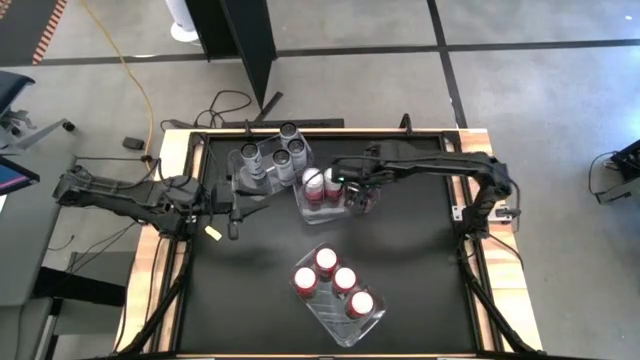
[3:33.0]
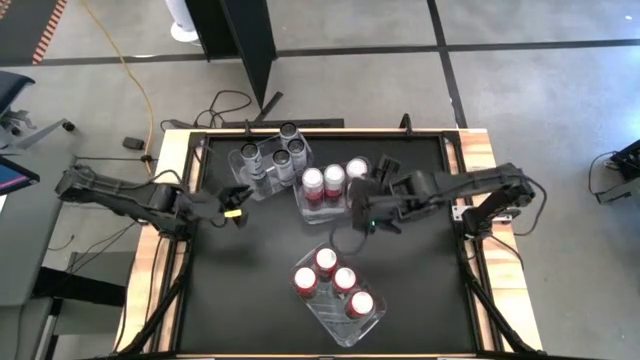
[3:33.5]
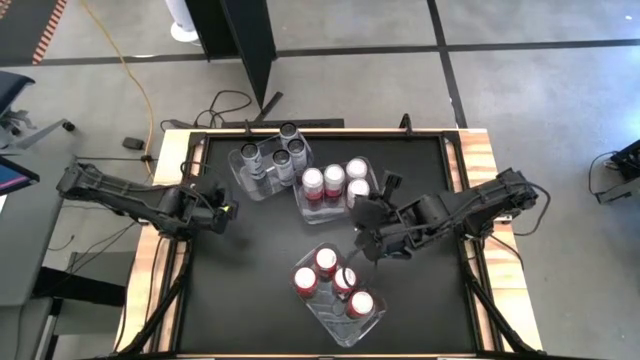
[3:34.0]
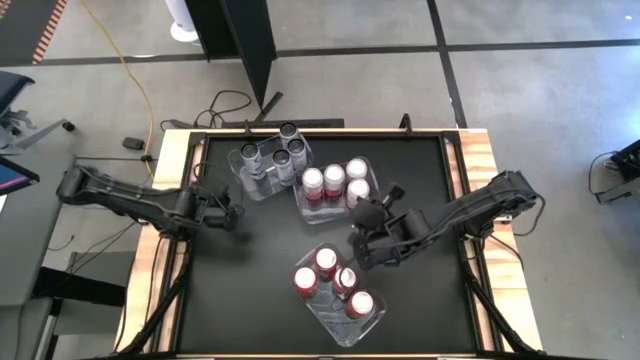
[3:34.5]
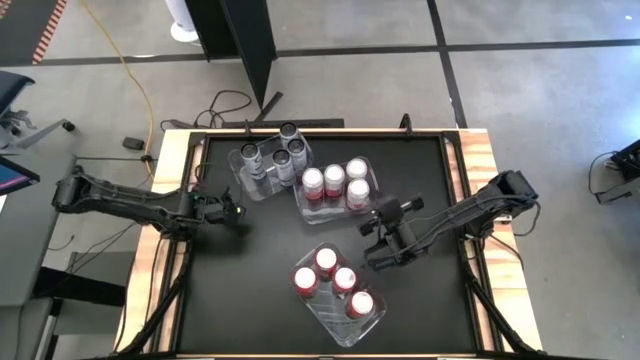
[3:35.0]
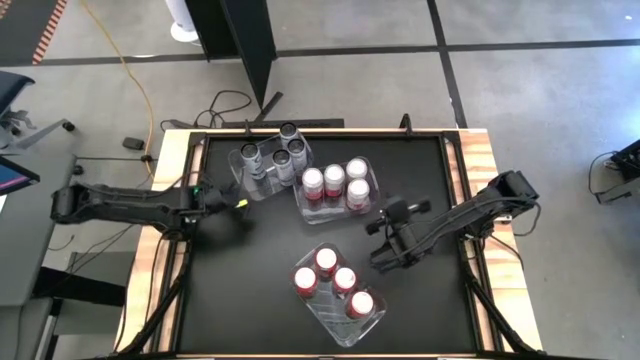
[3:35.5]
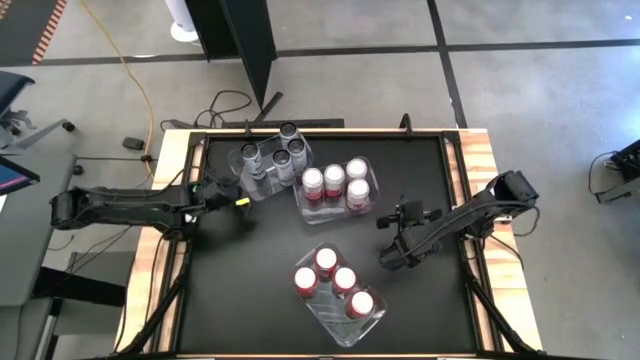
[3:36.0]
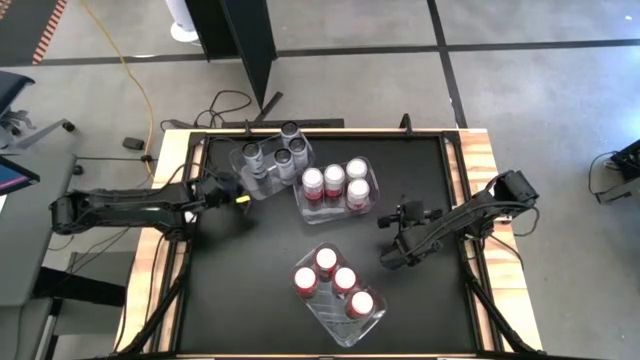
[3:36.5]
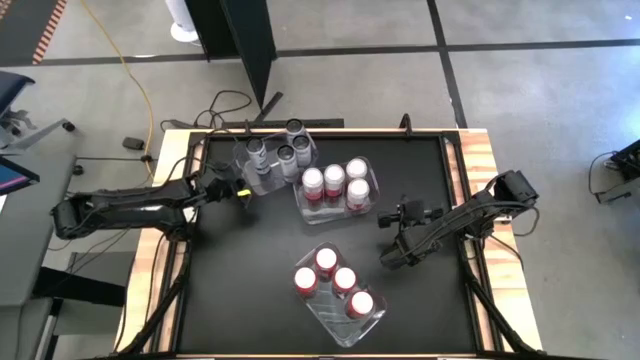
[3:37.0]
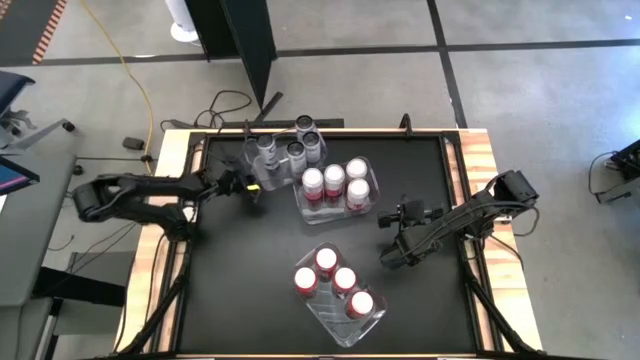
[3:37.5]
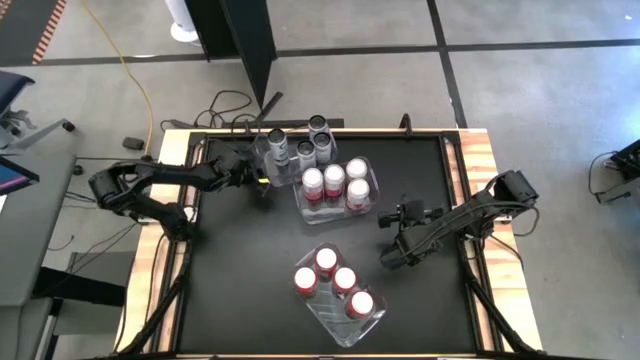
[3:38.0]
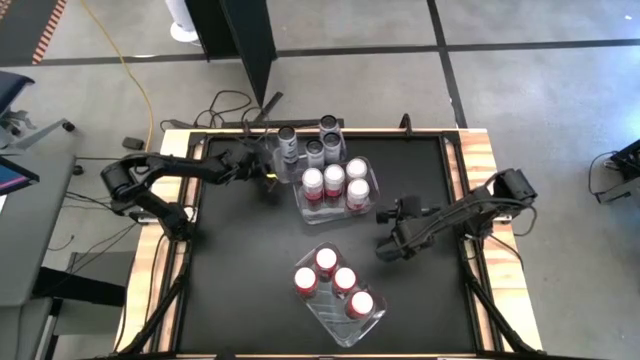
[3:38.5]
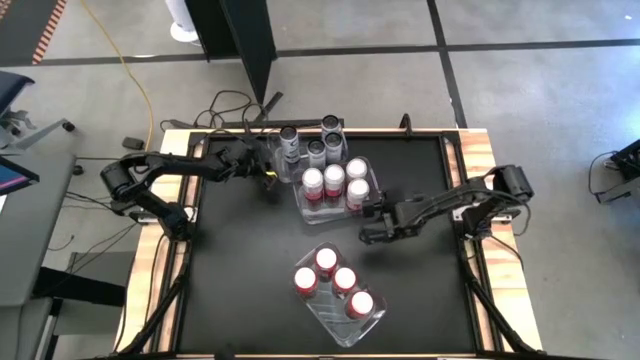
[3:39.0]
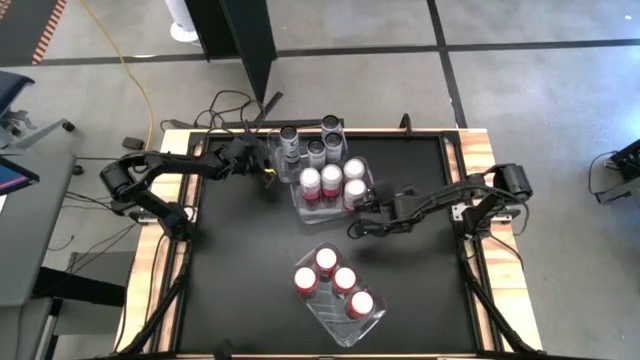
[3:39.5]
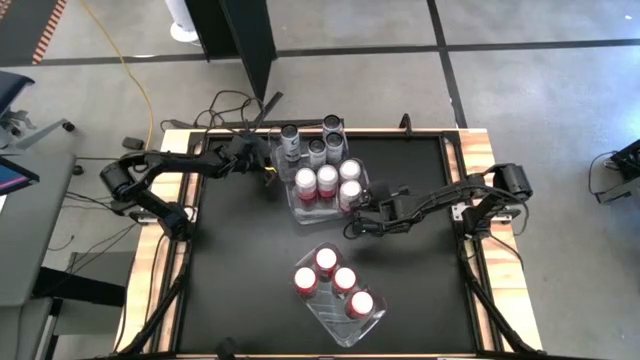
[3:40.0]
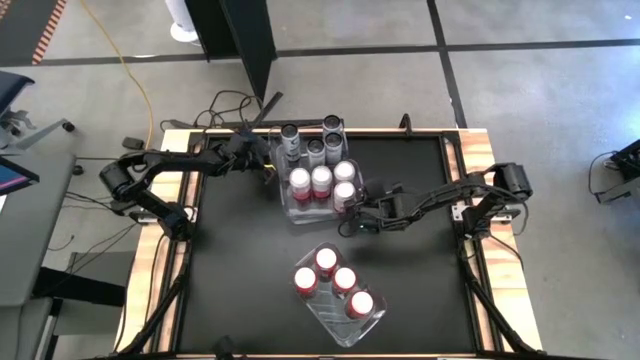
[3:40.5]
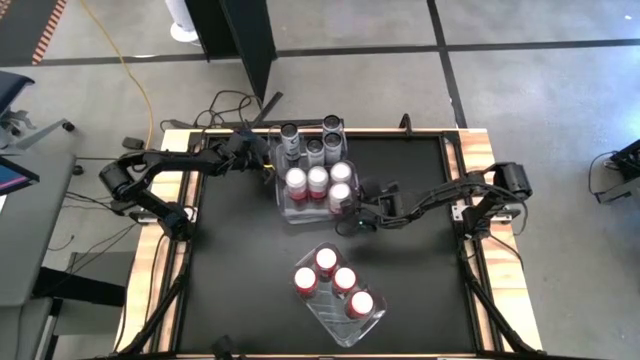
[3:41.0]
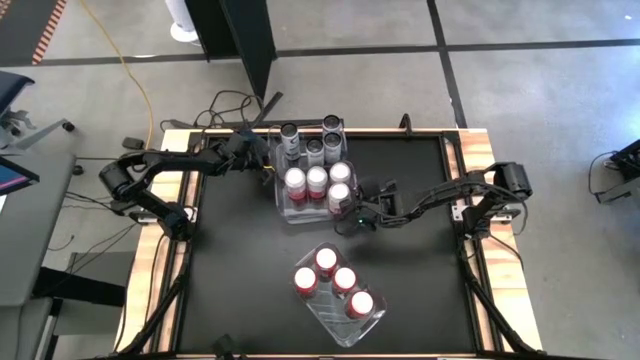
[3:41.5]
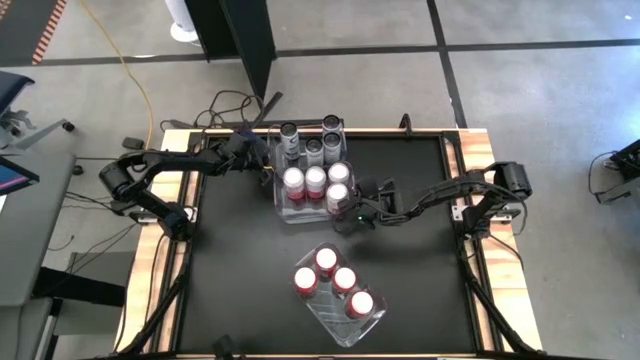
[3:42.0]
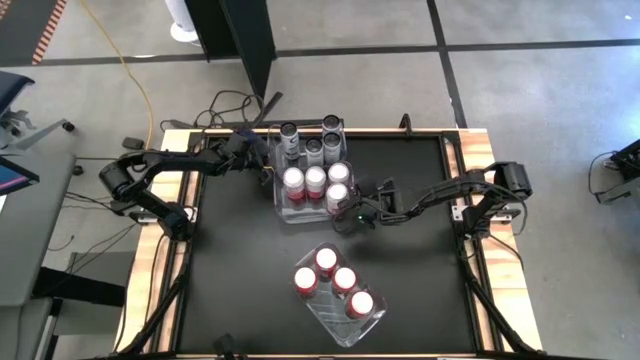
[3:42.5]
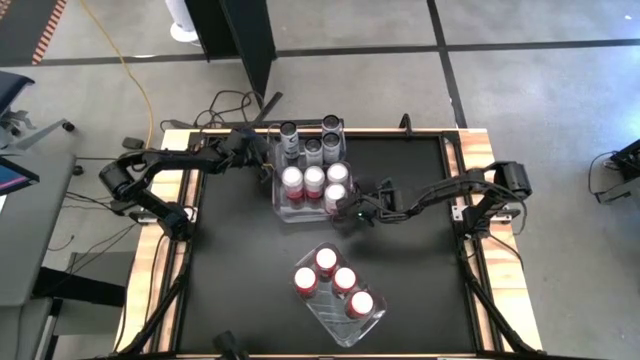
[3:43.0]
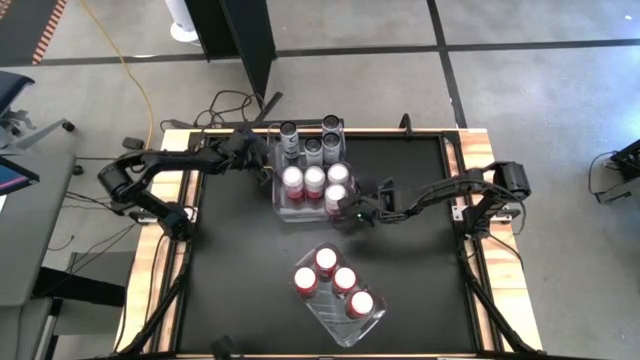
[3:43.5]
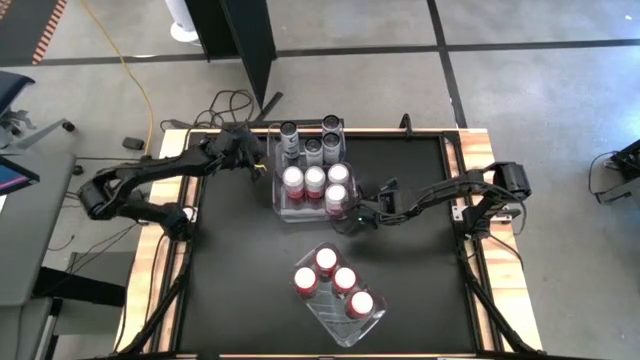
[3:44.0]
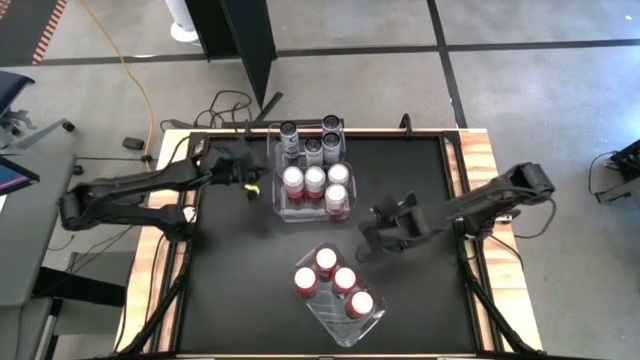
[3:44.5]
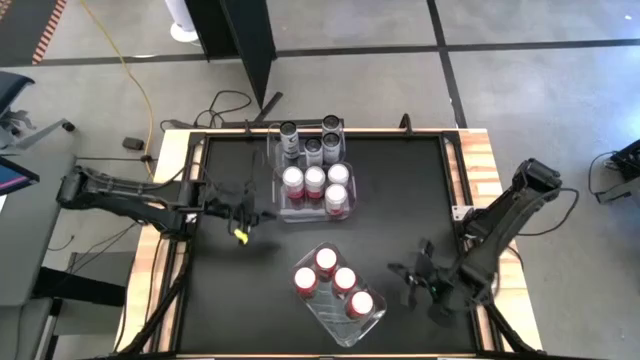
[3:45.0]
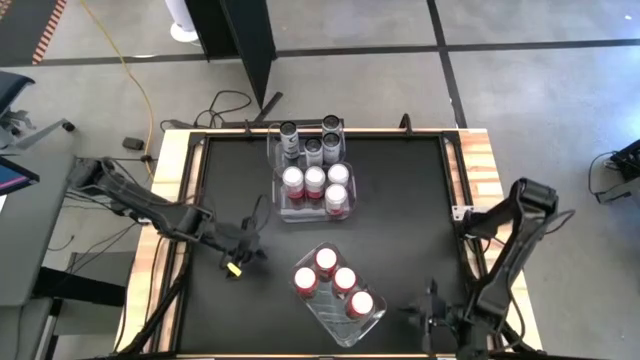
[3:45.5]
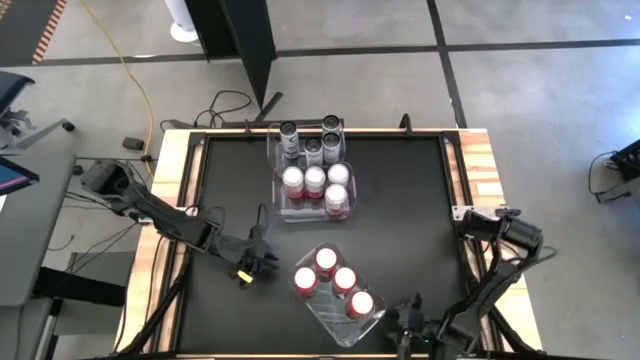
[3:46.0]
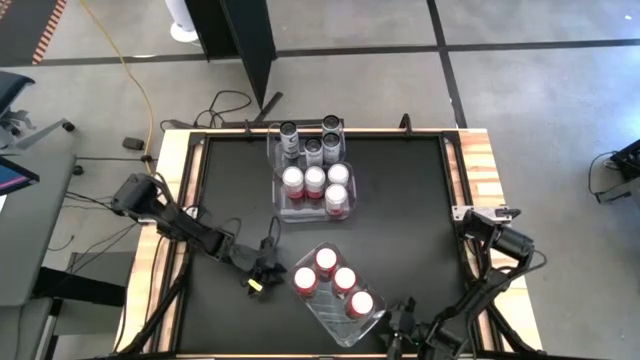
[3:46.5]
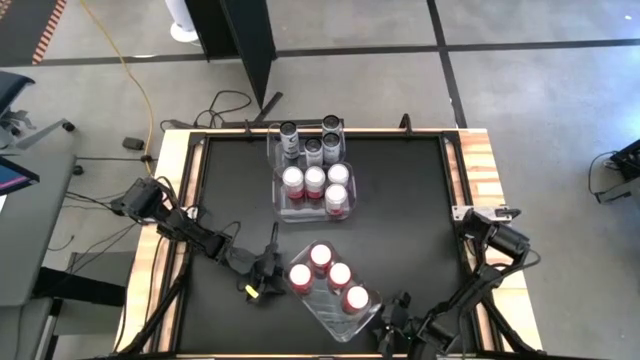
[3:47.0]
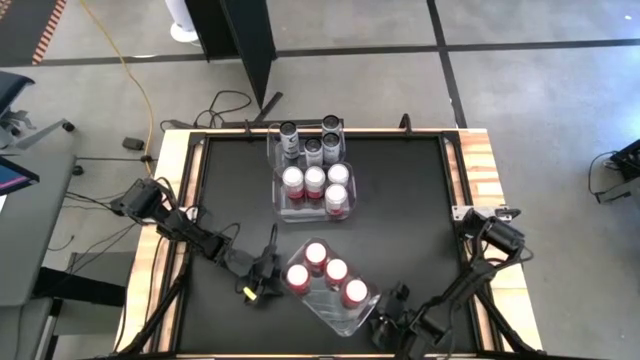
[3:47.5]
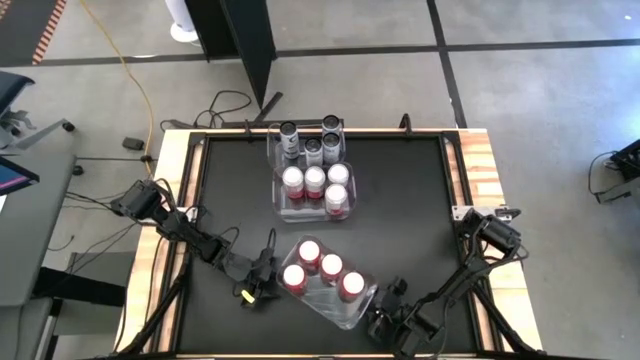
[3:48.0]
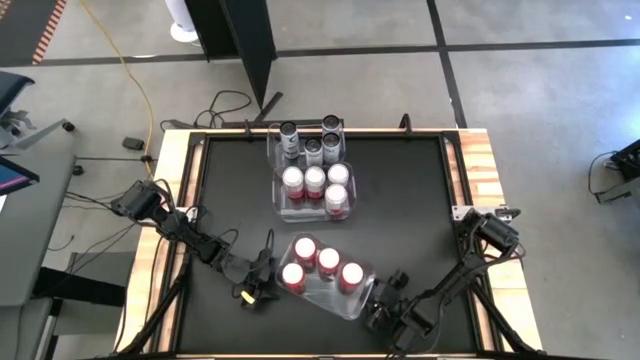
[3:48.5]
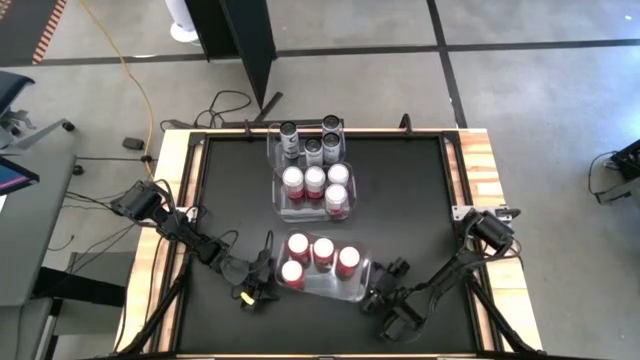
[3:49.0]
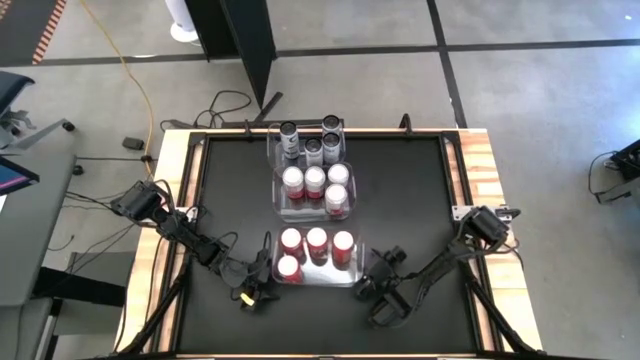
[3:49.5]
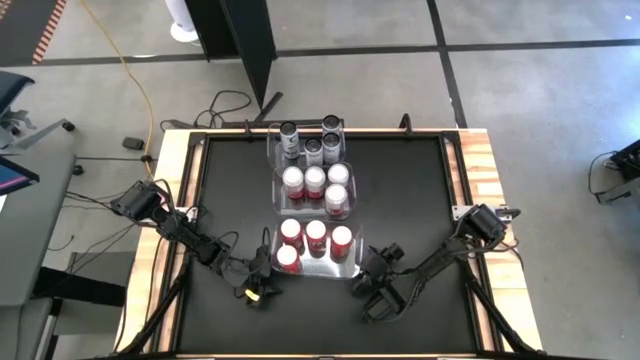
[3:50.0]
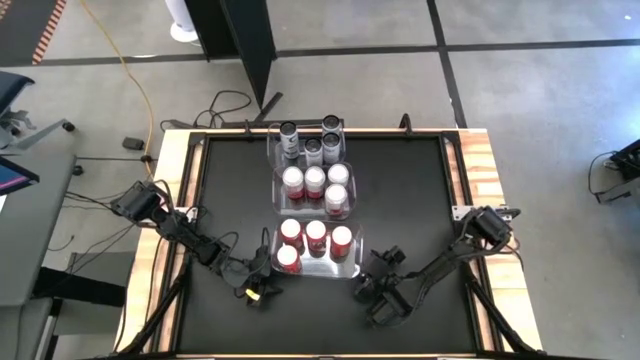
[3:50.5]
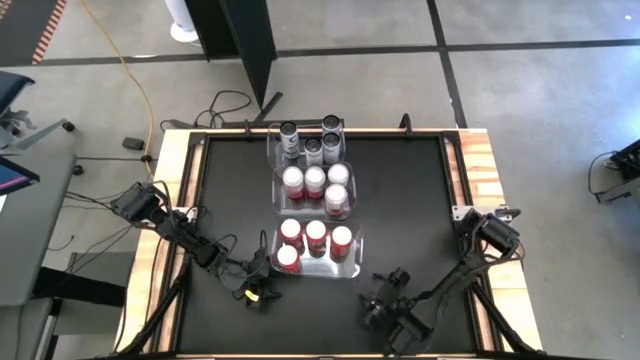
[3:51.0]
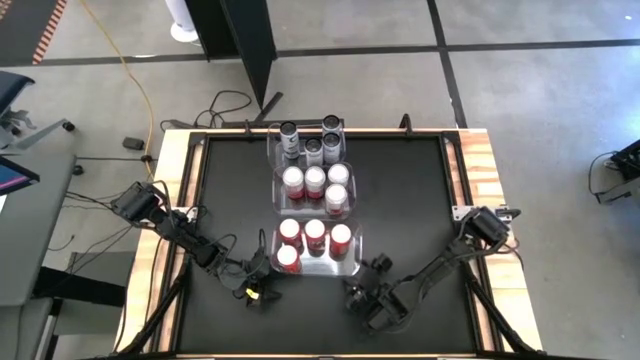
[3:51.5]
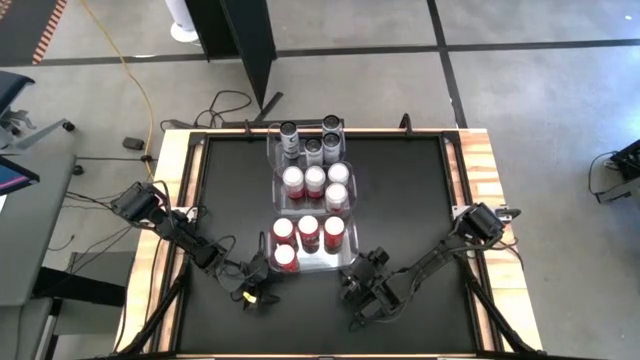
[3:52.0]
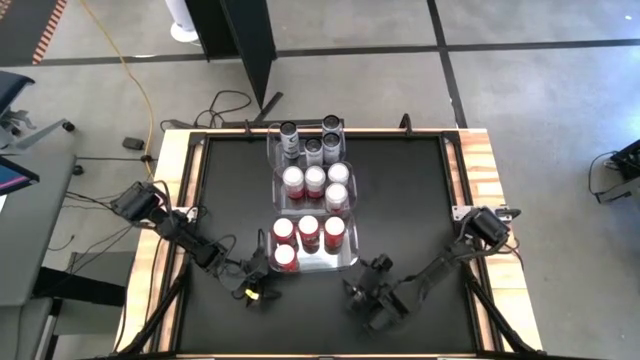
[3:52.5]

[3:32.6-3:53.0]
Task: Sort soda cans
Adjust the transparent bins
